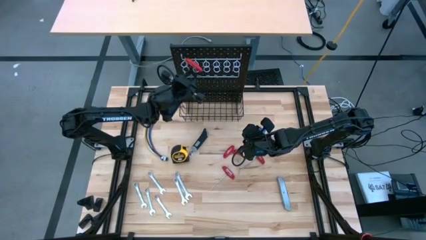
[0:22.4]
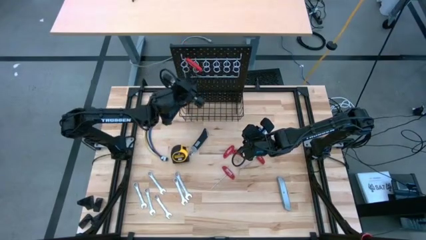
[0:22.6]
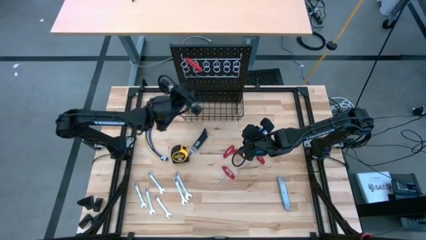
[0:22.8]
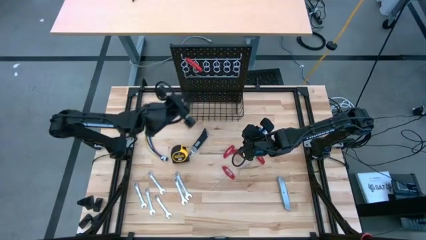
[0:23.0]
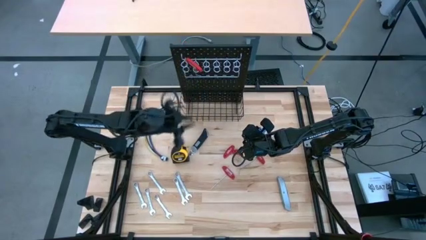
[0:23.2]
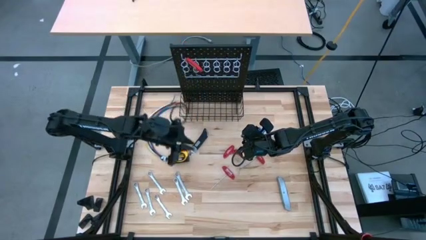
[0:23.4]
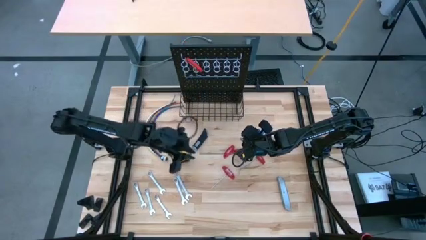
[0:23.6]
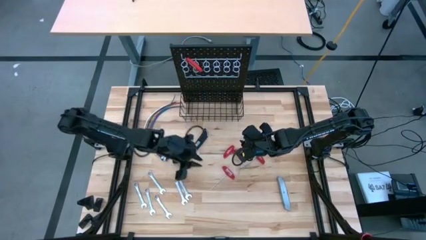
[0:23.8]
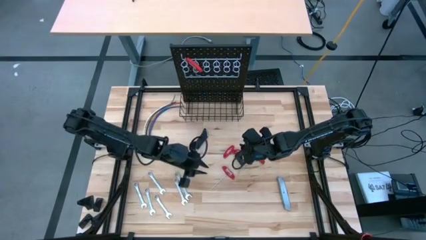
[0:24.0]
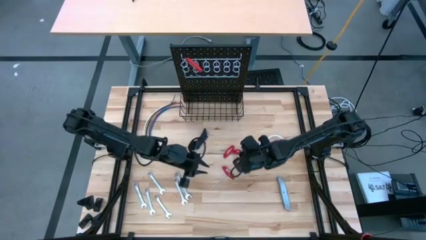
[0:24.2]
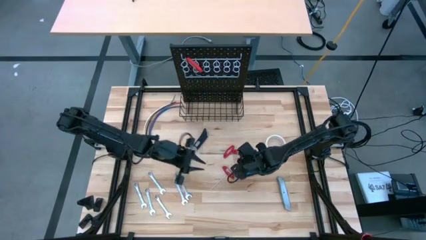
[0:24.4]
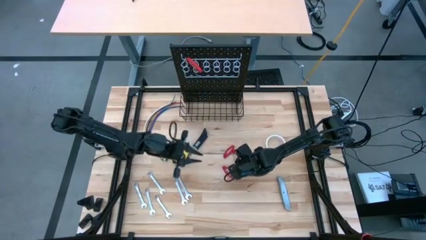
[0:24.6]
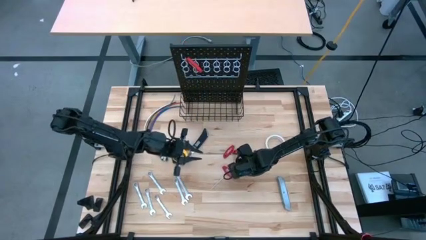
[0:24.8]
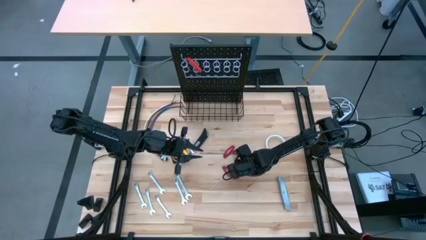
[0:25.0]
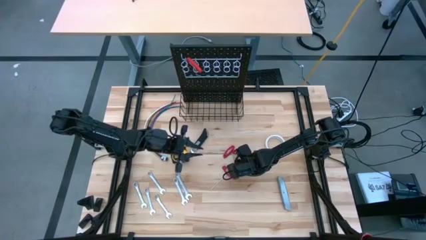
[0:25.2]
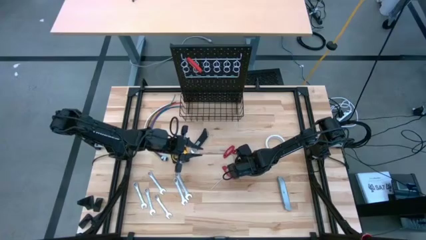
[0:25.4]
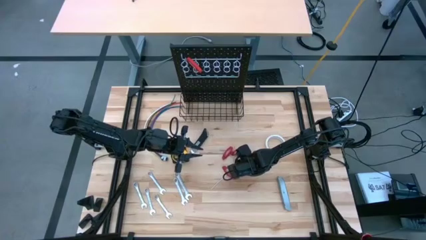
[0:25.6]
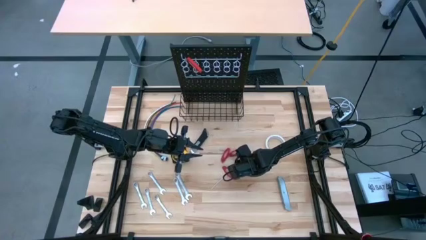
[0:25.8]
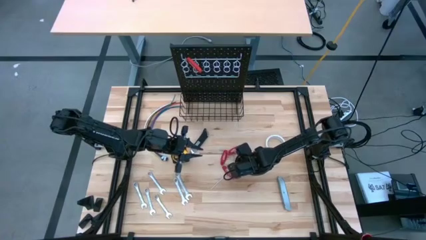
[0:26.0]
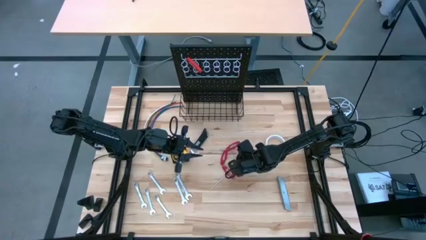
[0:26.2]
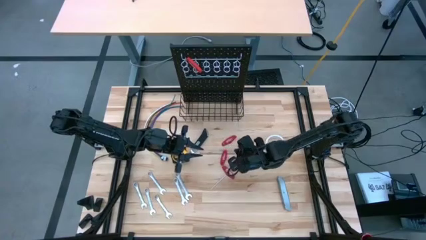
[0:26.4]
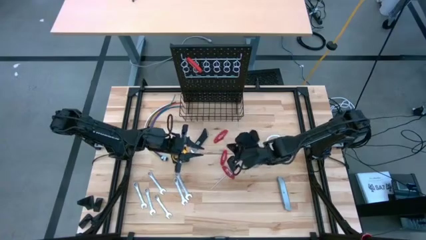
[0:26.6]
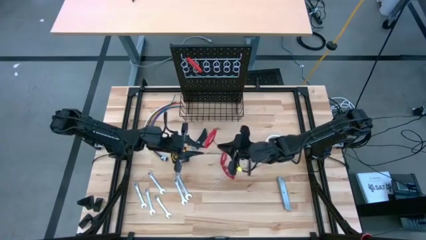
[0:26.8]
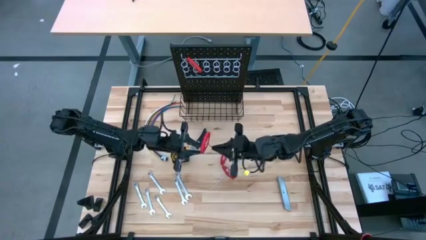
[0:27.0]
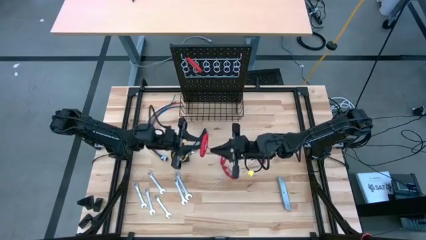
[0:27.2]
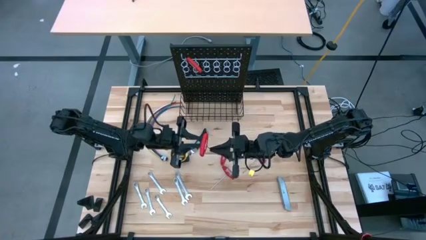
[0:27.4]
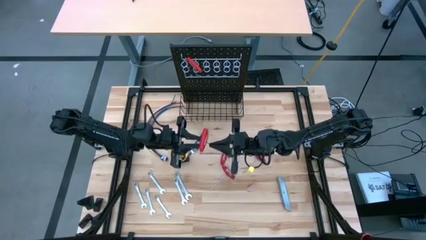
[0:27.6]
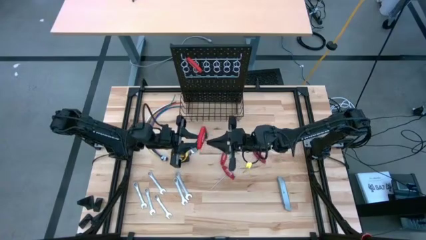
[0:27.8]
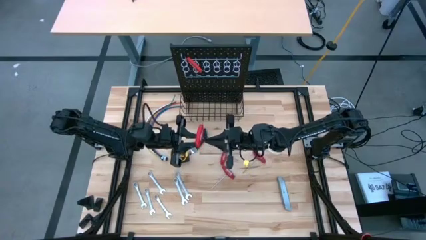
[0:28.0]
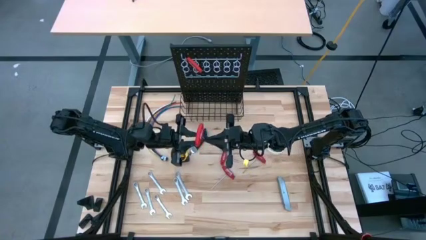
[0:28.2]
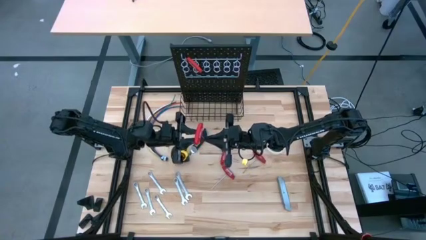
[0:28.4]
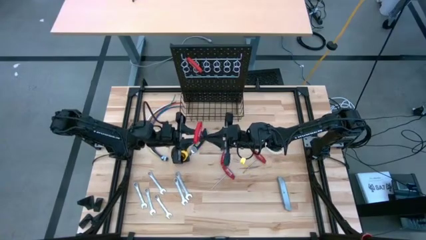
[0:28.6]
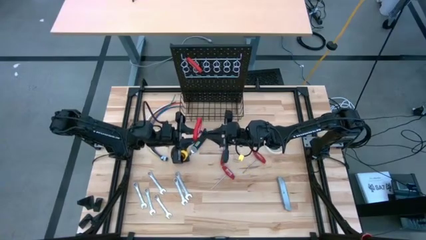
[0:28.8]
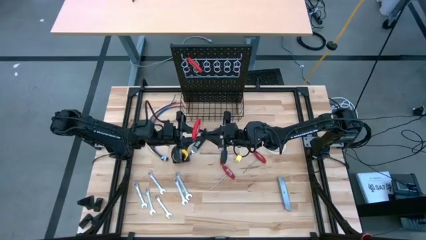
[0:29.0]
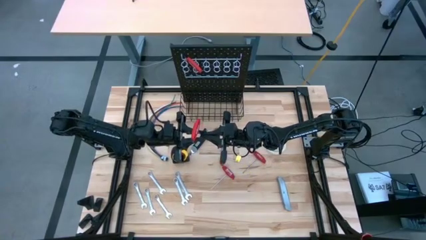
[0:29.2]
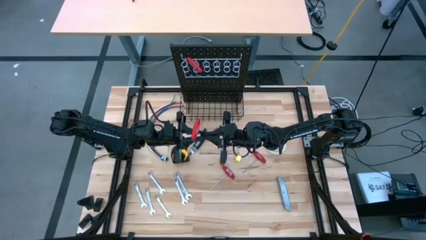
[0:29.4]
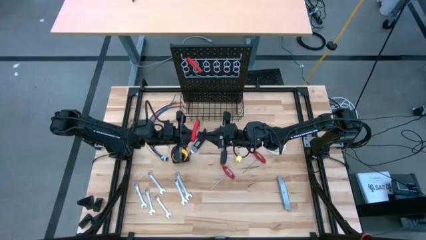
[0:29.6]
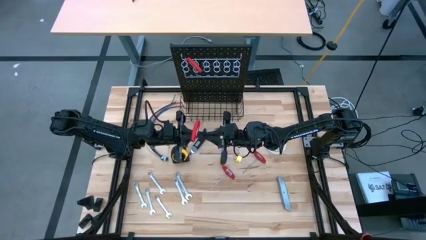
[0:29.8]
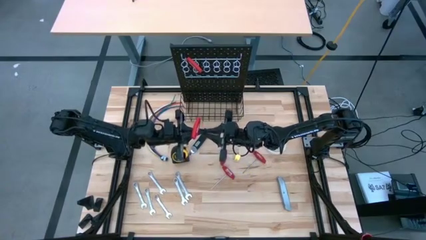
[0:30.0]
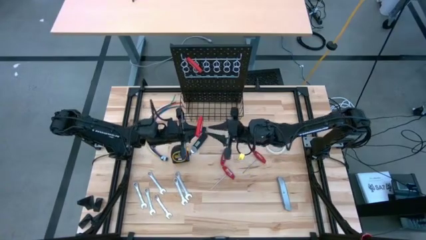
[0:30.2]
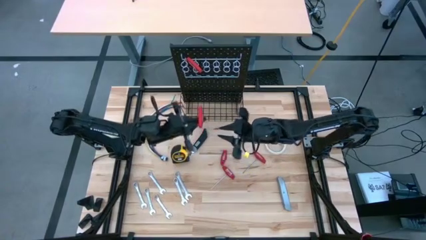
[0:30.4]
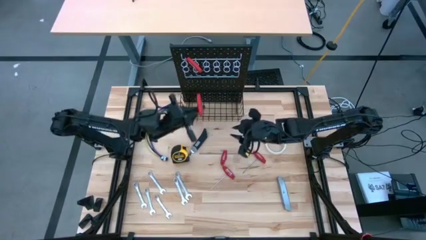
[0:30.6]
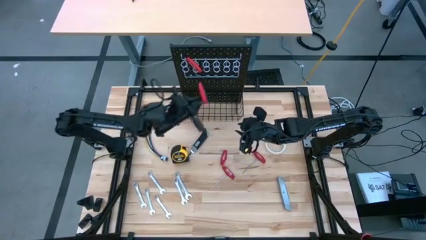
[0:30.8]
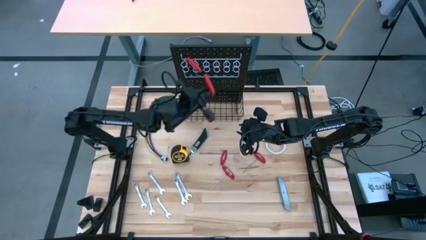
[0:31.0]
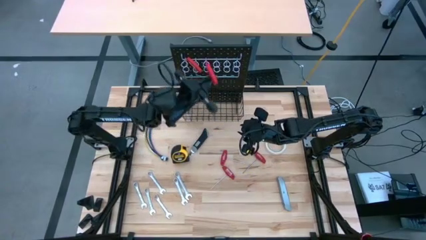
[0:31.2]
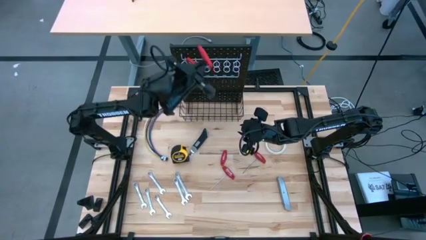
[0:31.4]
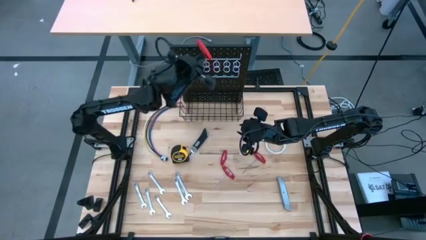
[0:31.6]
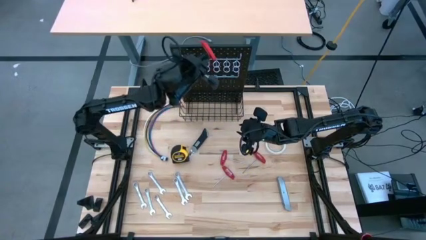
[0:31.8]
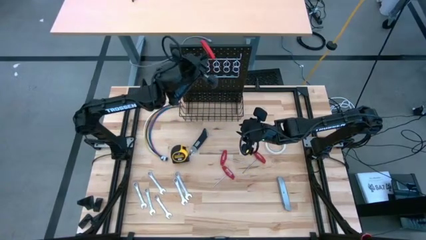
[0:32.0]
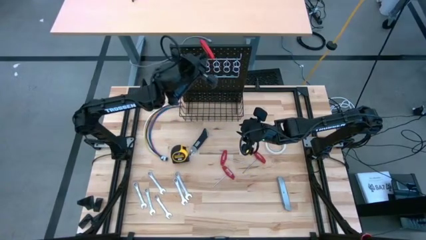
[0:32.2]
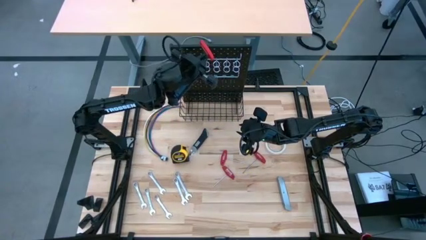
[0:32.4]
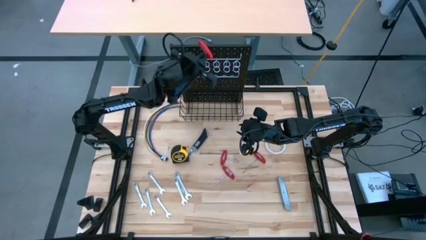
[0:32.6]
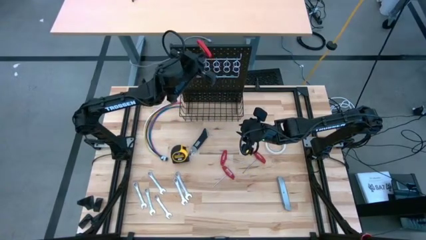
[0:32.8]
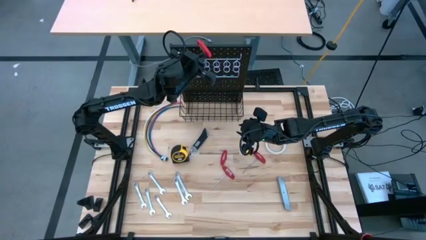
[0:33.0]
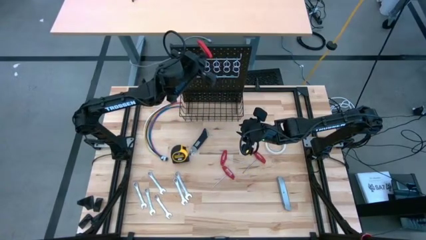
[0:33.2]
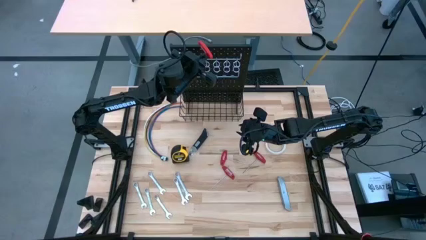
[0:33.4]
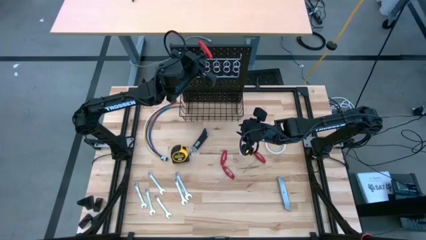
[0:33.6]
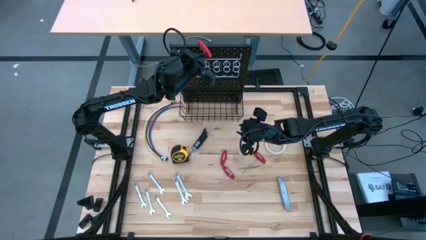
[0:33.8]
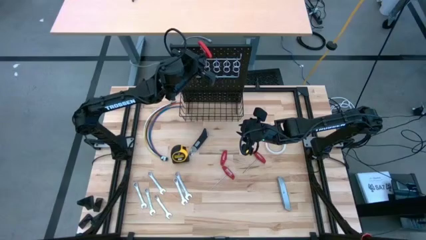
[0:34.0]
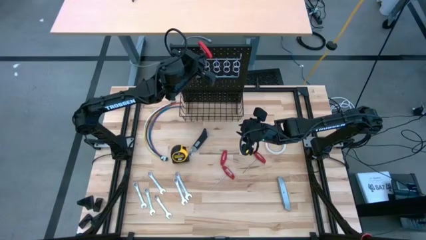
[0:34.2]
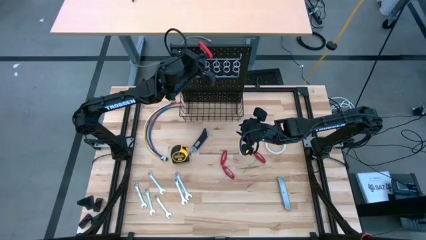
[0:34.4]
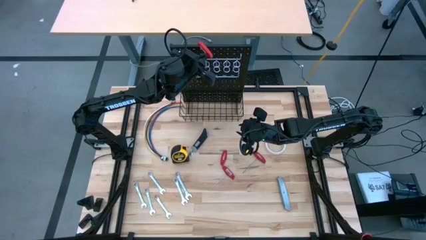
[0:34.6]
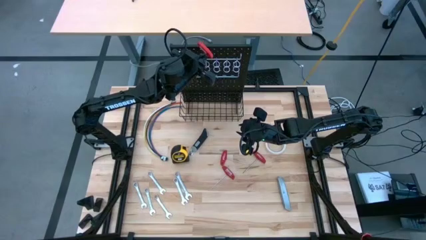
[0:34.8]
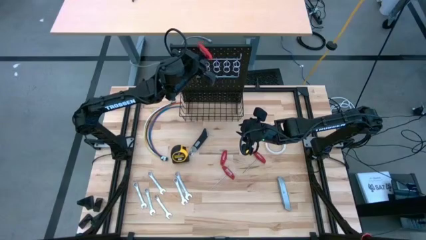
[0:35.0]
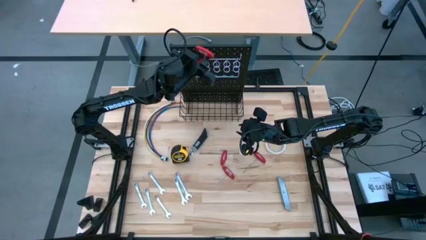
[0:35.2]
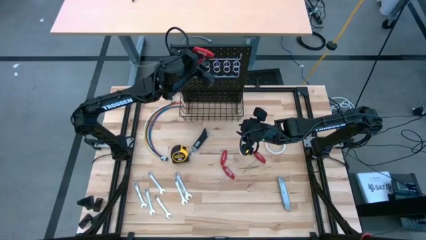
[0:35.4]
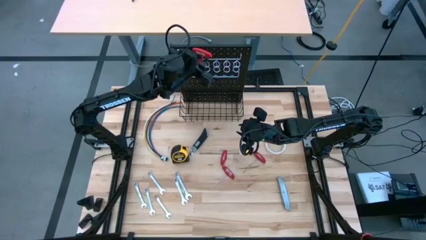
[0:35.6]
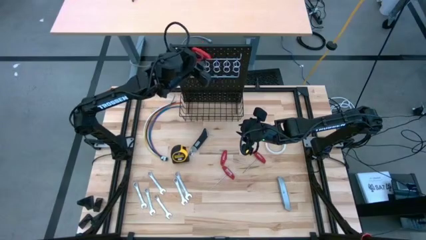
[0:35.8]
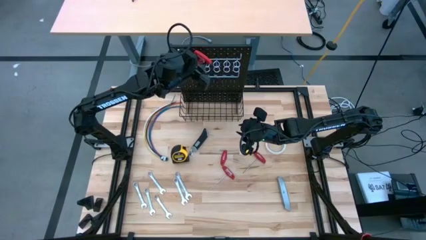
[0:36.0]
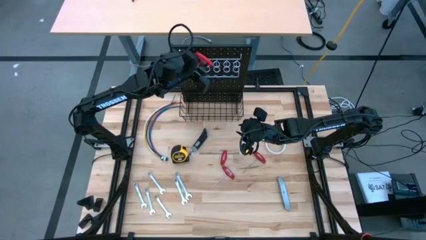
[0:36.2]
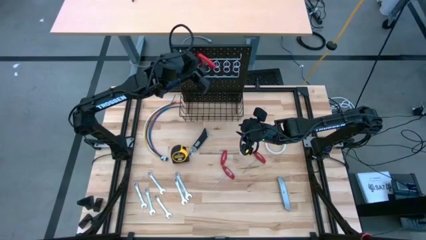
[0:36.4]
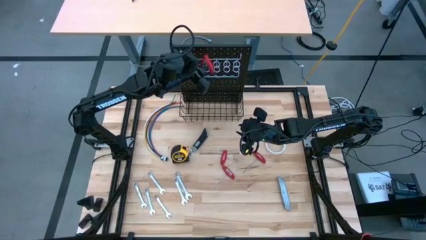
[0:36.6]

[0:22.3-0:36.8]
Task: Hang tools onto peg board
Hang the allen wrench on the peg board

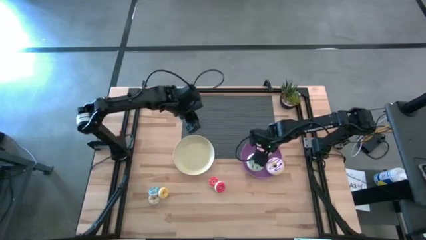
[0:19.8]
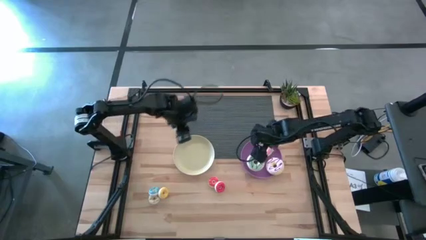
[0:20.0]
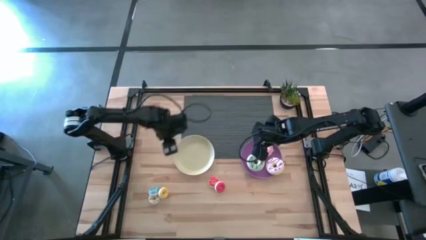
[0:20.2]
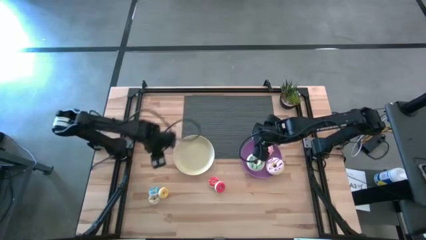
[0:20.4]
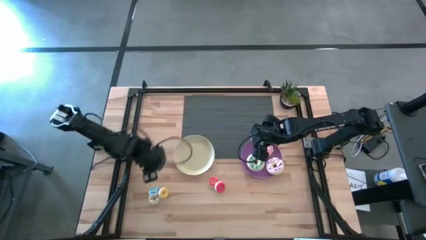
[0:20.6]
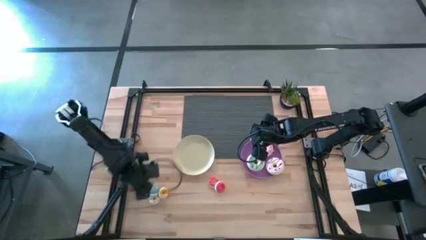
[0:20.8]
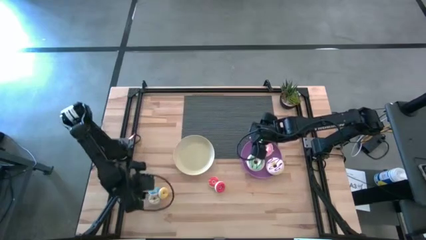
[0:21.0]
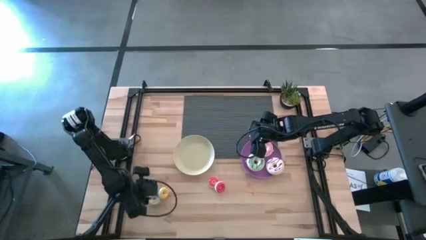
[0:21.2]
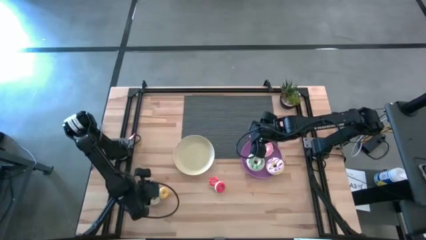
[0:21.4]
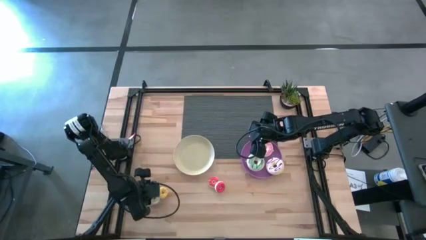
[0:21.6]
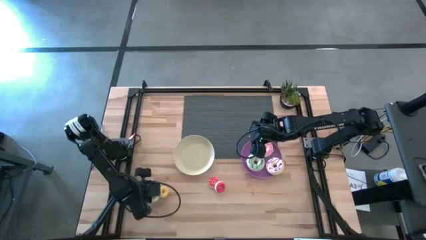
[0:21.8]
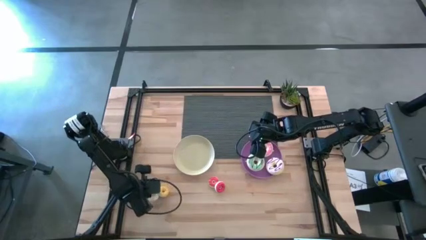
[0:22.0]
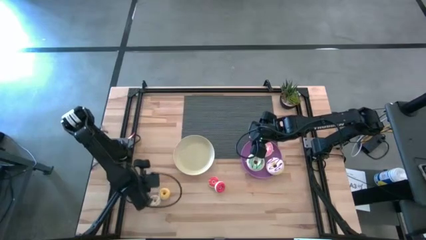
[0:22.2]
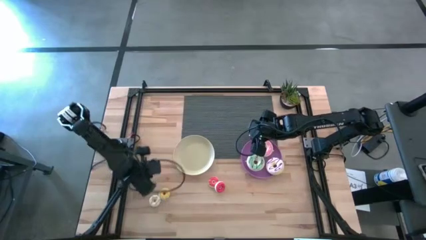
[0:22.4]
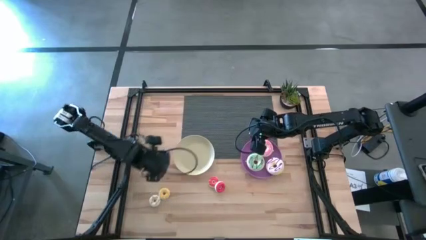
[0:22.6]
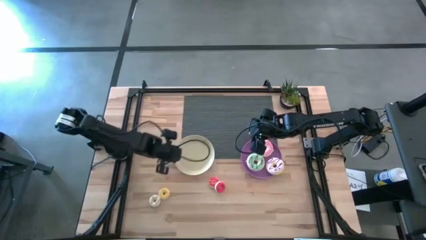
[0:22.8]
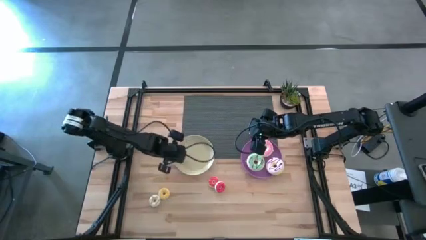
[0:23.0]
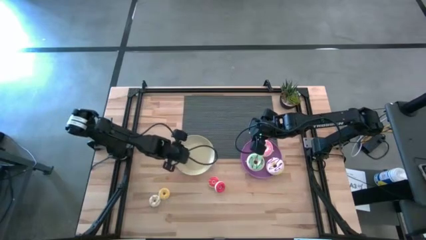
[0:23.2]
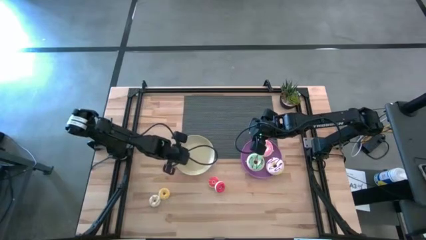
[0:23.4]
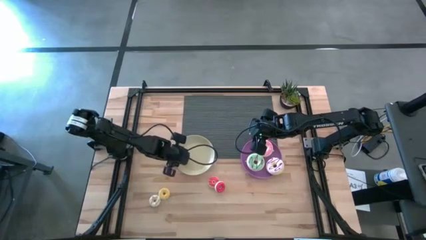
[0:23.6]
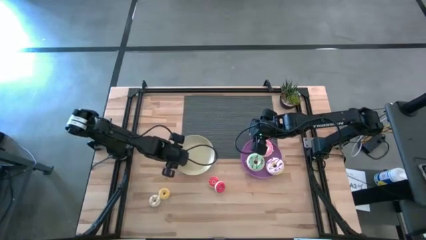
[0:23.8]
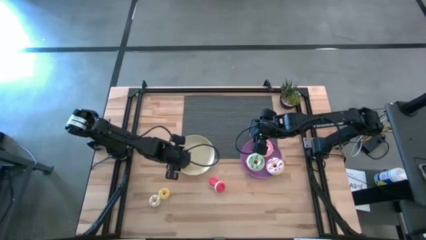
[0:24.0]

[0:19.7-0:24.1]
Task: Pick & Place donuts
Put the small dark blue donut on the white plate
